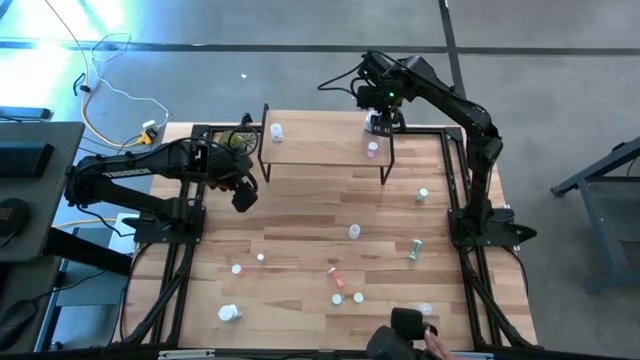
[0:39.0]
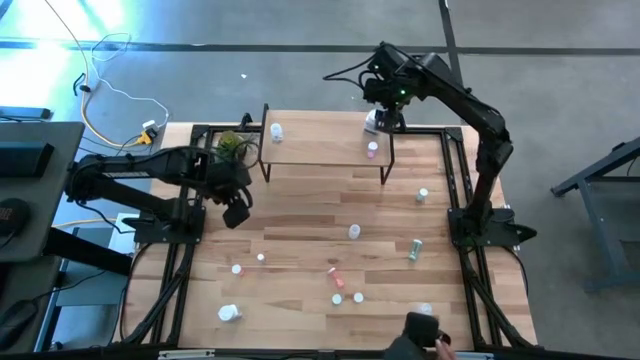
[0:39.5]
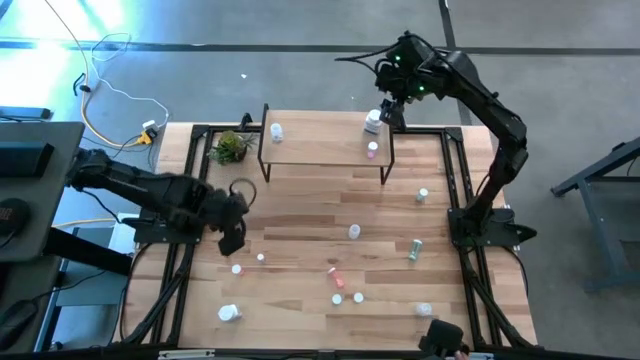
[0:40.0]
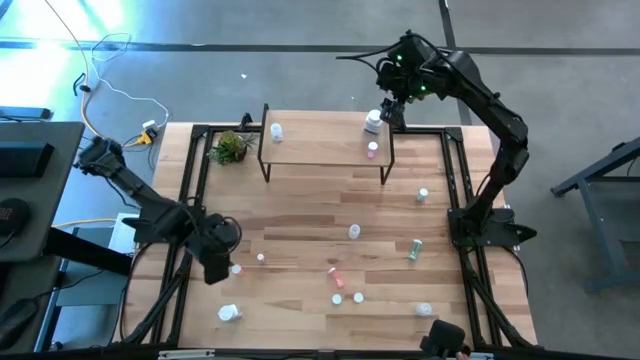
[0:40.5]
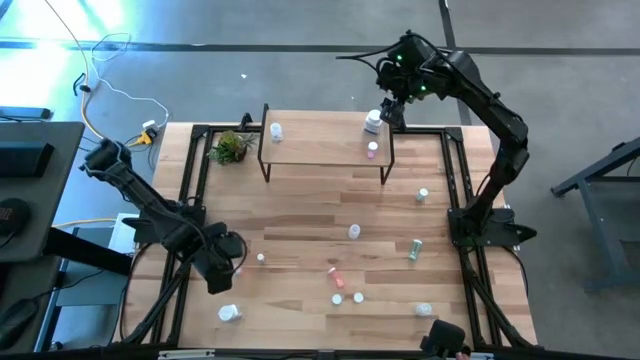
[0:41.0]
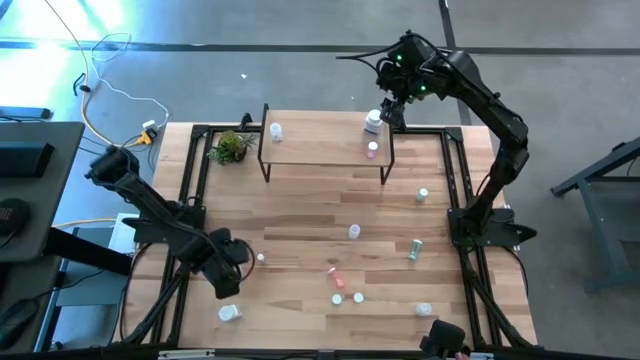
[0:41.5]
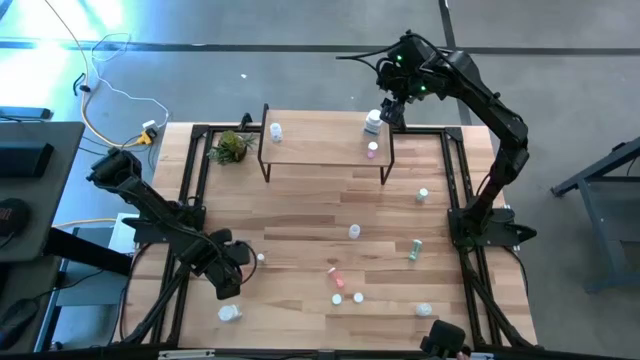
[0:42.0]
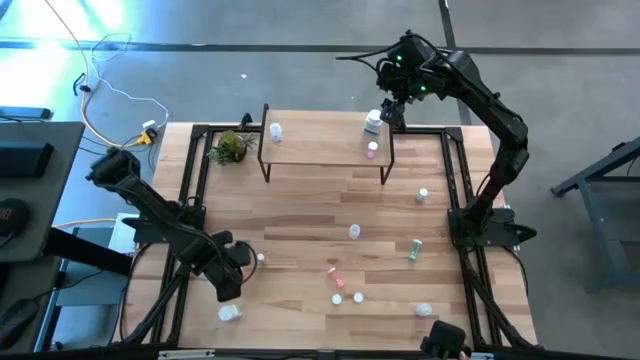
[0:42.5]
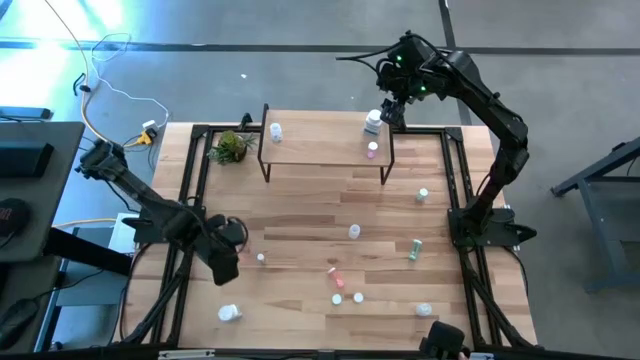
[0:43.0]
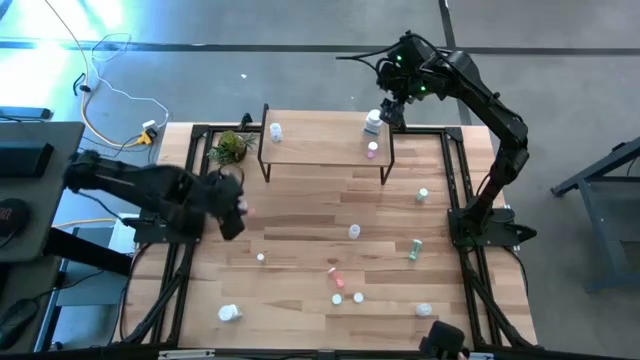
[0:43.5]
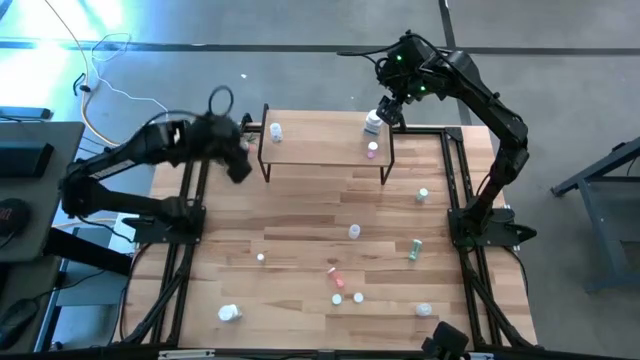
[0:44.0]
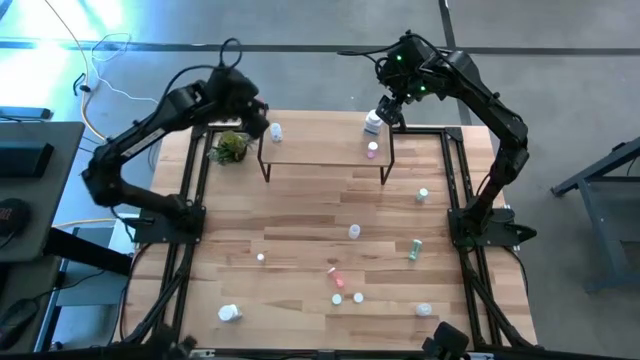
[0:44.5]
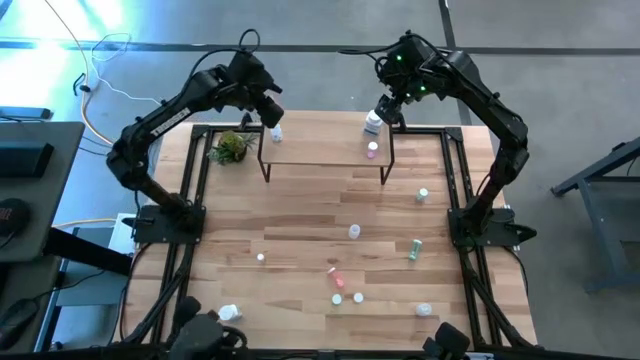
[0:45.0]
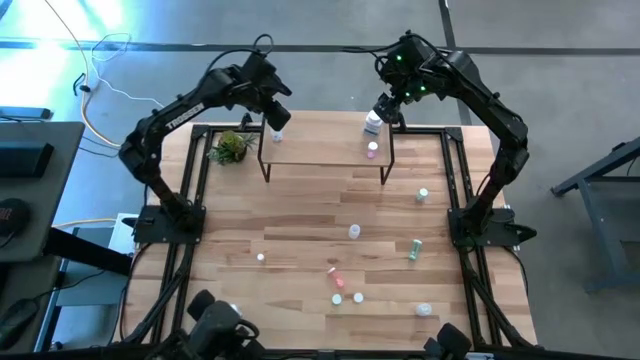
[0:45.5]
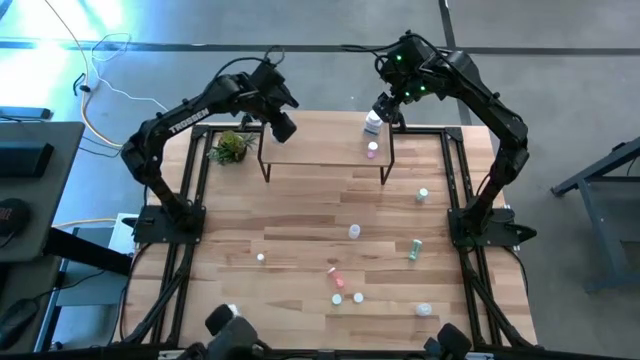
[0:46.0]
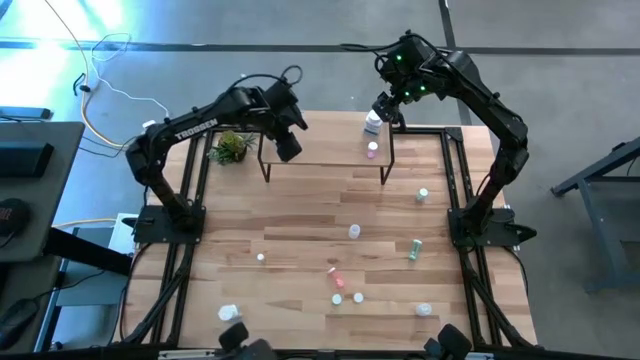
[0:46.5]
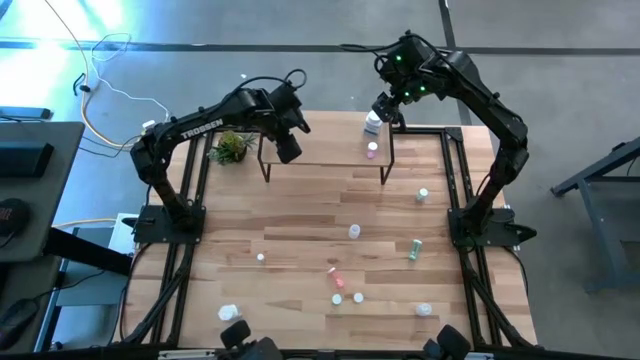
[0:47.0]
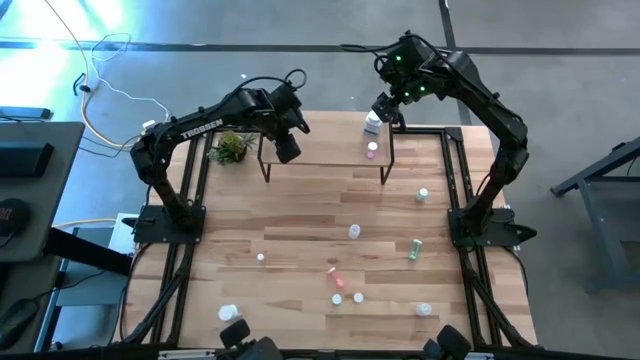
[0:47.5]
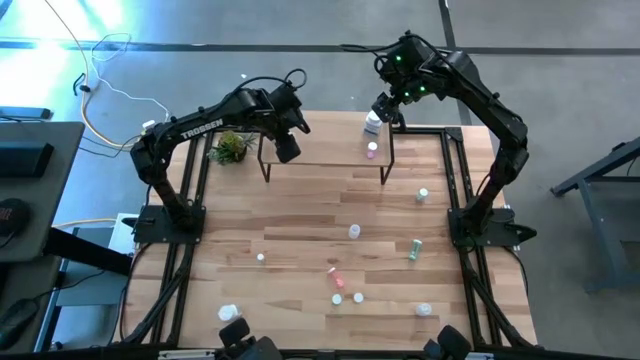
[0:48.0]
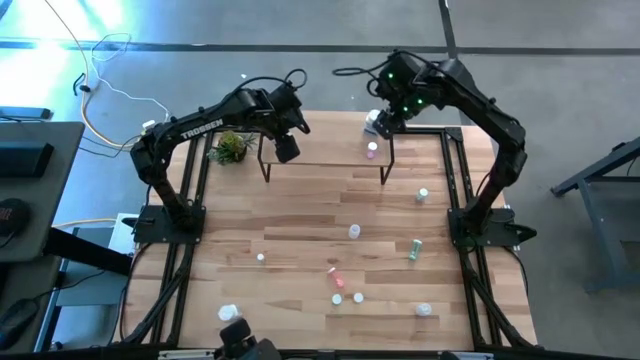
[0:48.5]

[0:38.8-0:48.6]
Task: Pick and place medicine bottles onto shelf by color
Put the left orange pill bottle on the shelf

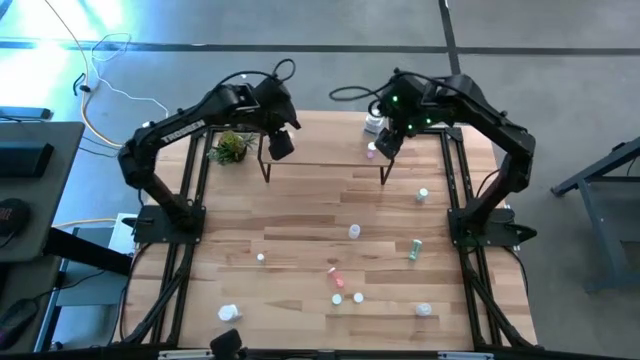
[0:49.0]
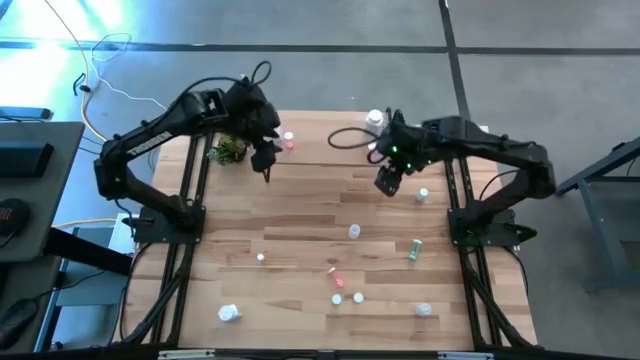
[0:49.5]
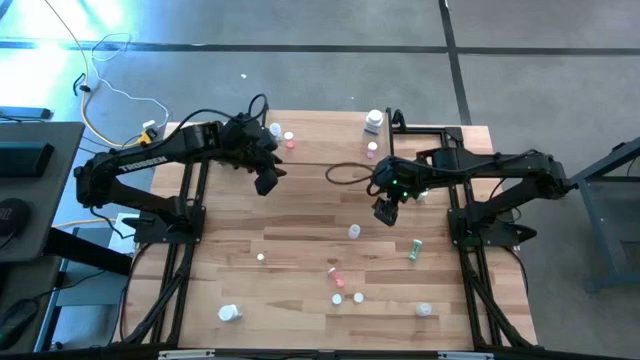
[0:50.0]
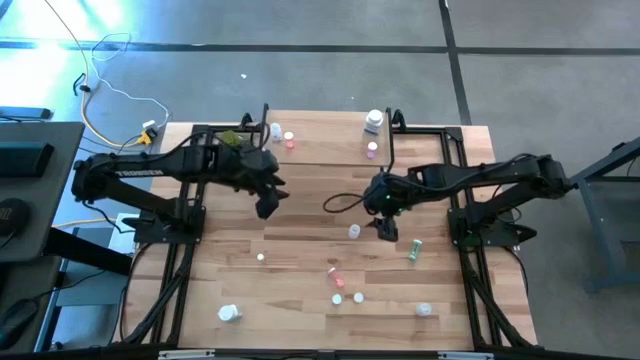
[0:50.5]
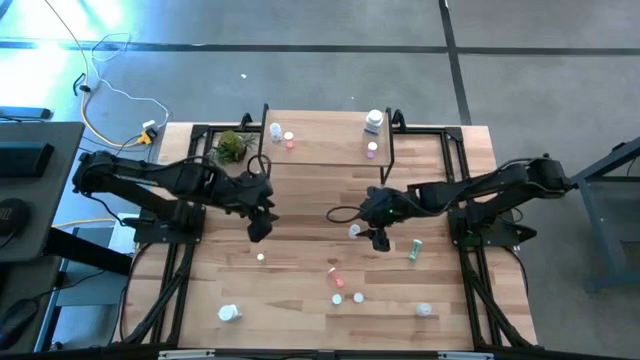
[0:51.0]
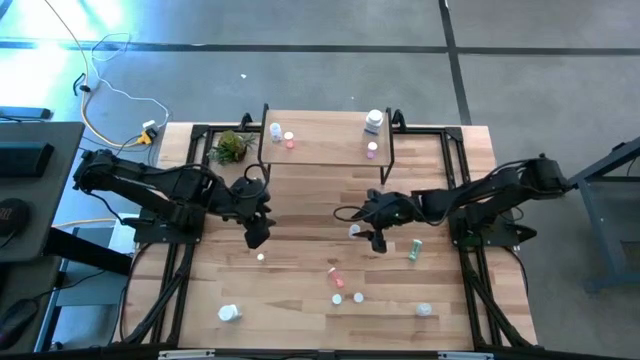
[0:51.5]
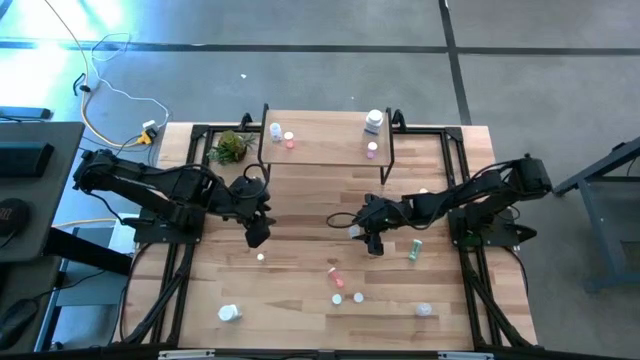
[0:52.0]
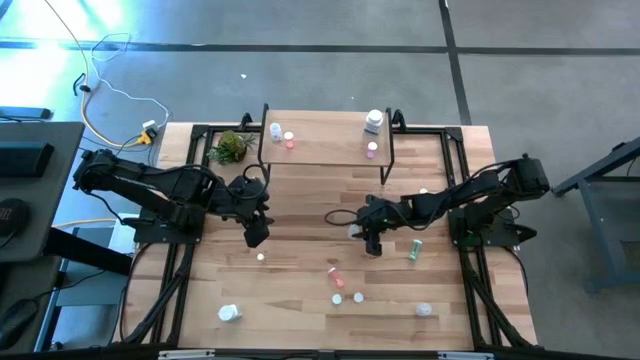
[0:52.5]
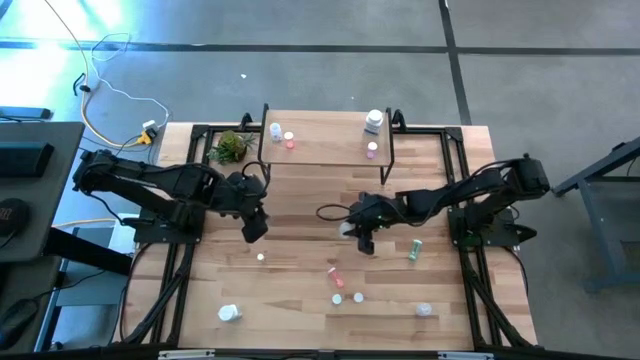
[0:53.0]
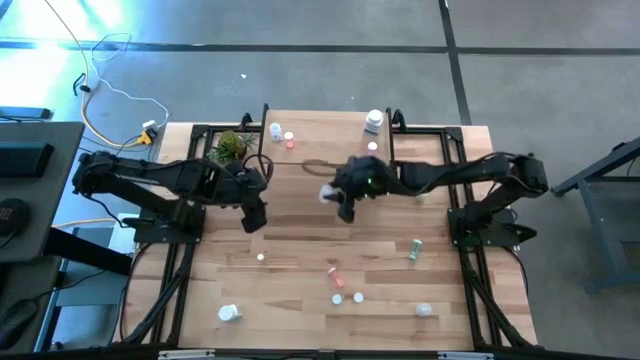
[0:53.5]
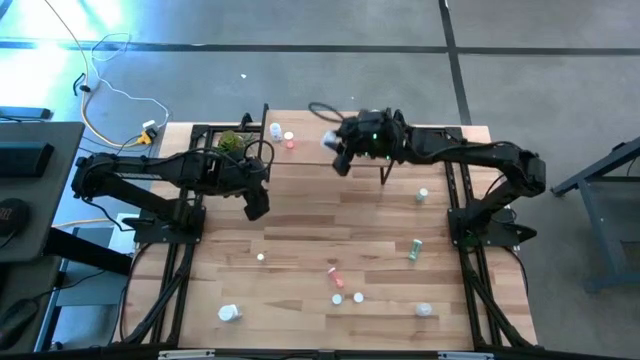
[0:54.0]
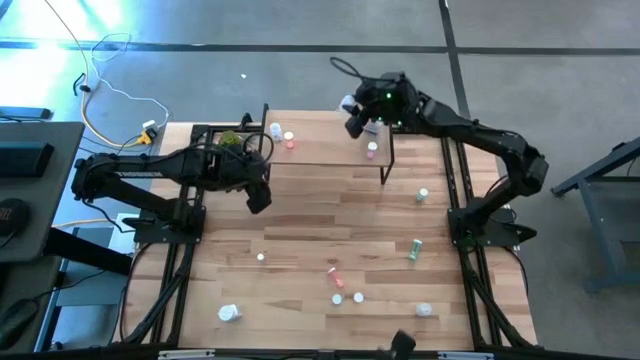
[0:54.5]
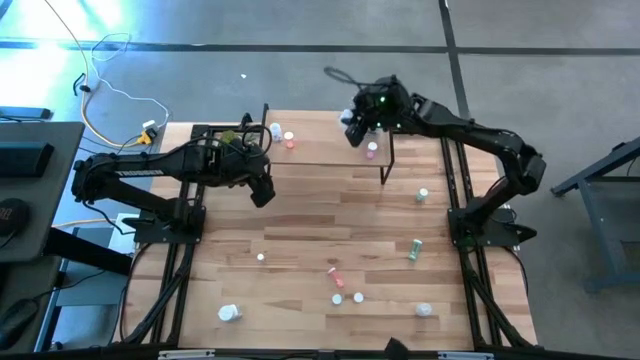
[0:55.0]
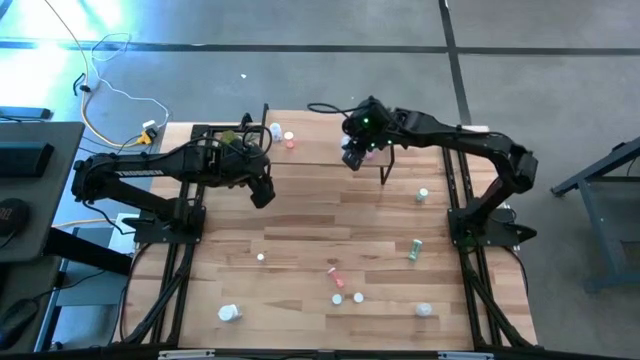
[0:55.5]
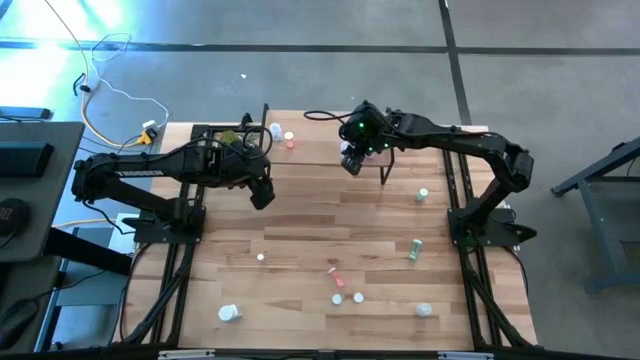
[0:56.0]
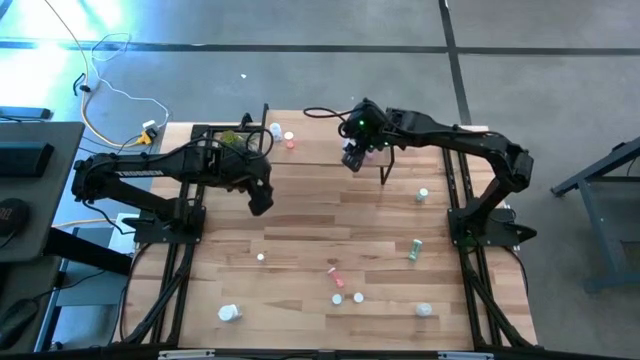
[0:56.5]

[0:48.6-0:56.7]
Put the top transparent pill bottle on the shelf

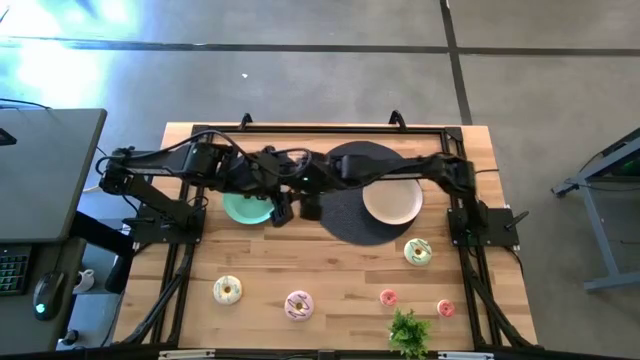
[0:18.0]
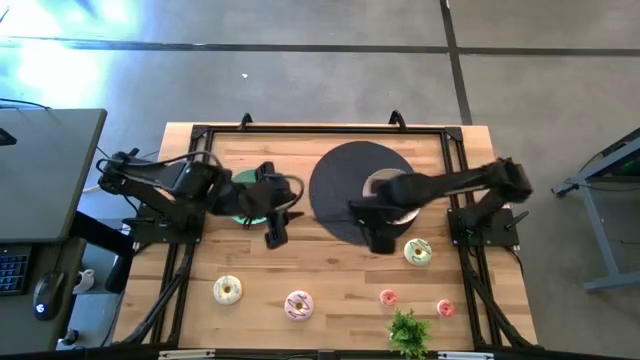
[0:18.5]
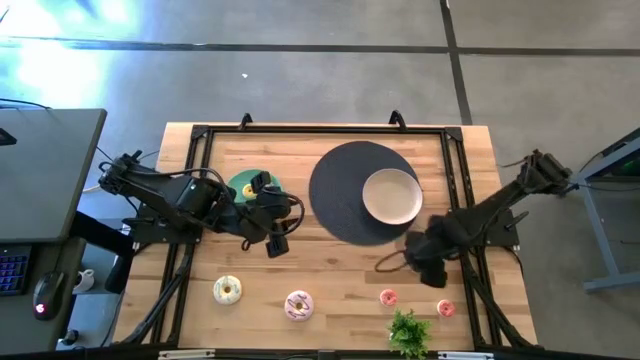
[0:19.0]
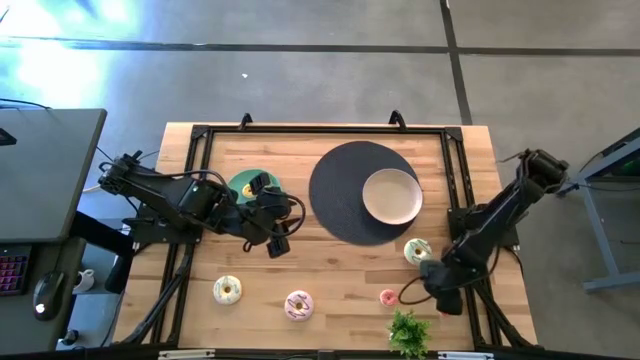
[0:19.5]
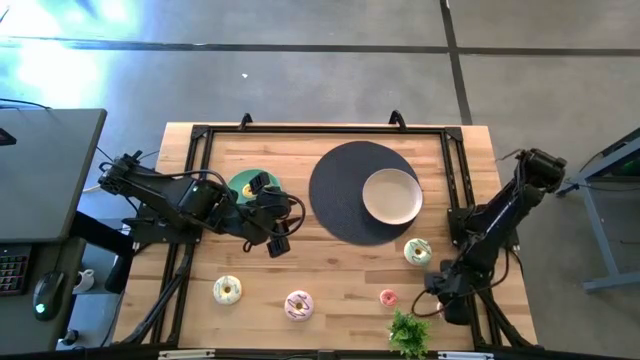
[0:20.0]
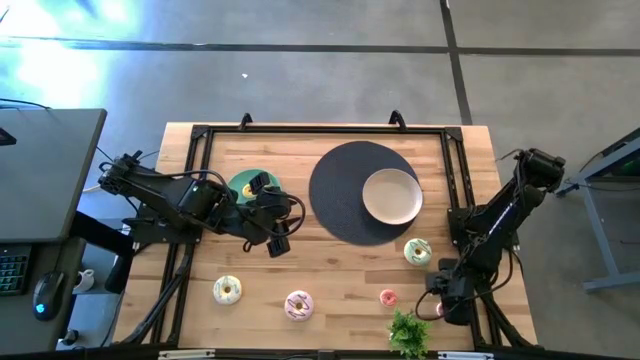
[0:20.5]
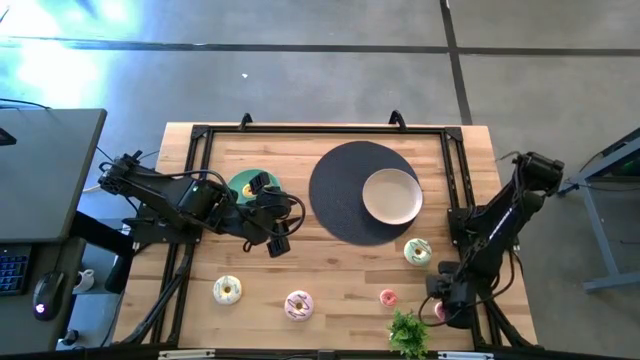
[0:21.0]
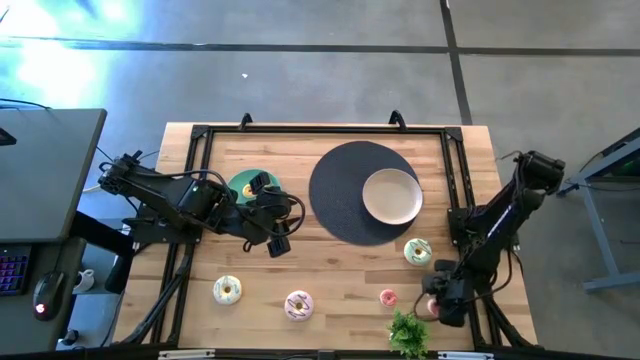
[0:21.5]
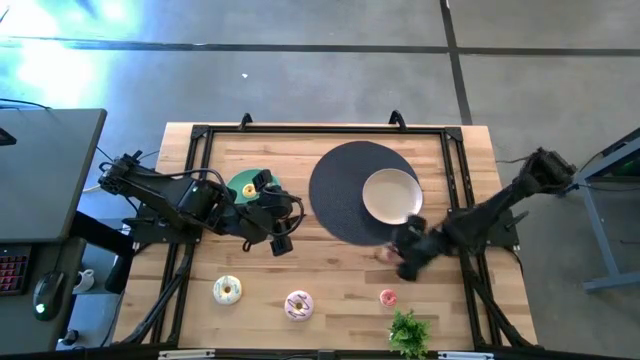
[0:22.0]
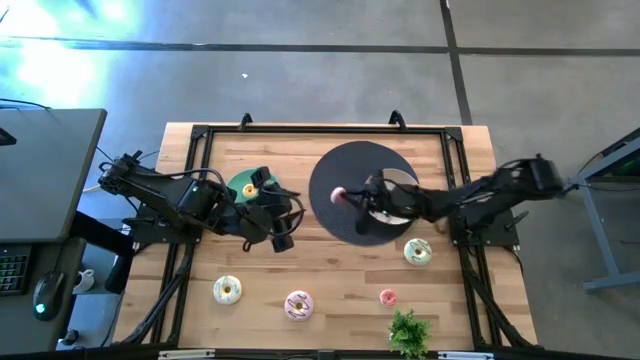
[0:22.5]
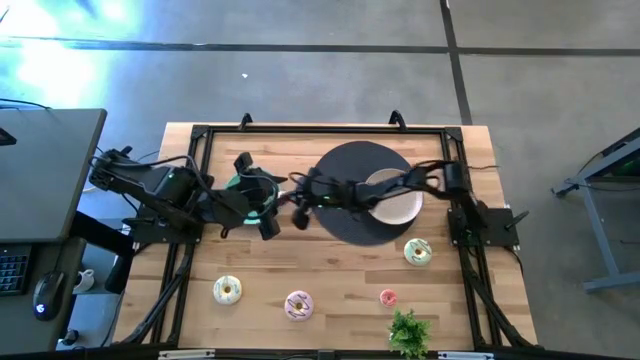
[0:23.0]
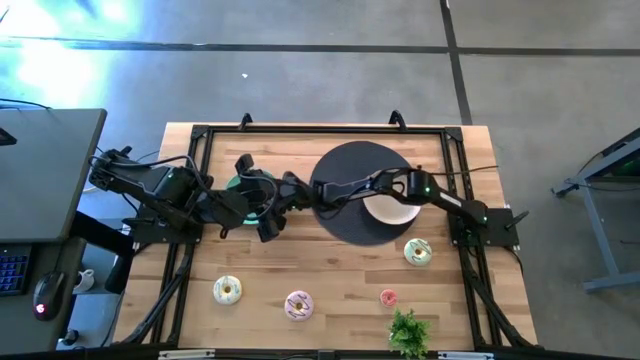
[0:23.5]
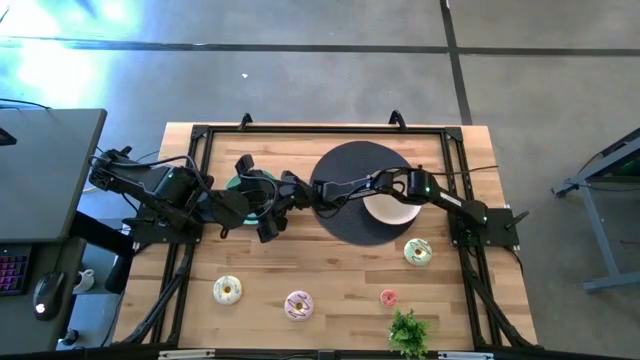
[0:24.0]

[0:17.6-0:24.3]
Task: Pick & Place donuts
Put the right small pink donut onto the blue plate
